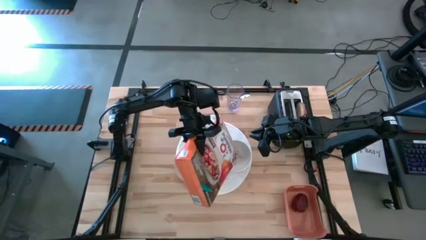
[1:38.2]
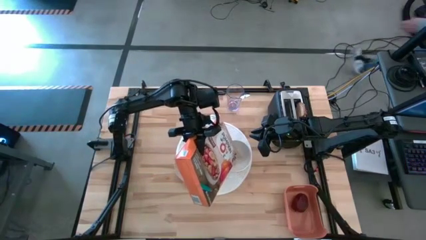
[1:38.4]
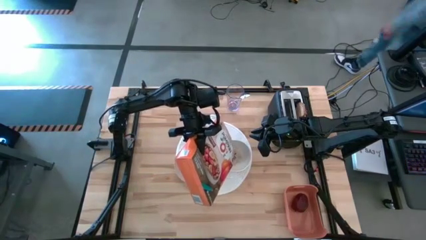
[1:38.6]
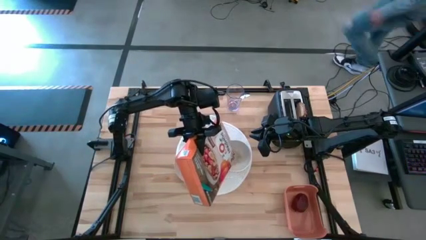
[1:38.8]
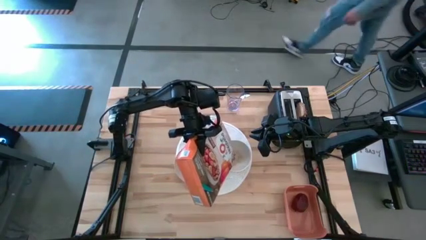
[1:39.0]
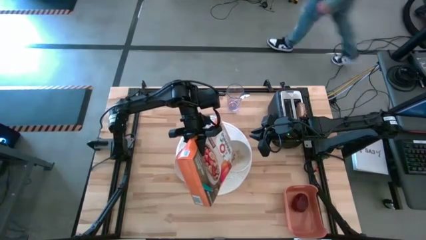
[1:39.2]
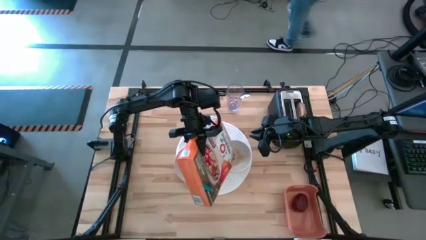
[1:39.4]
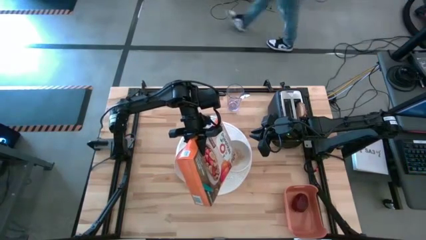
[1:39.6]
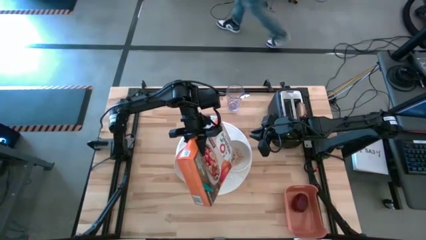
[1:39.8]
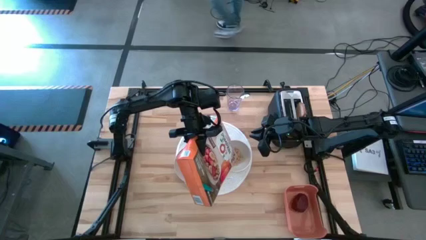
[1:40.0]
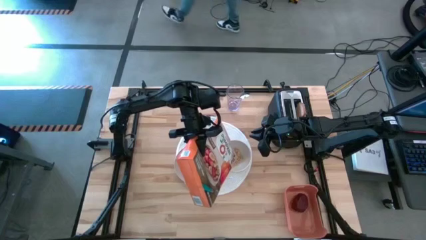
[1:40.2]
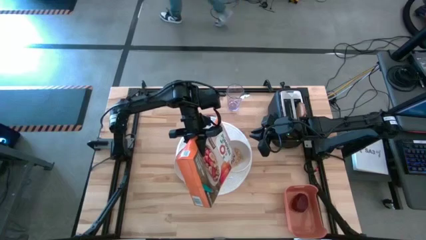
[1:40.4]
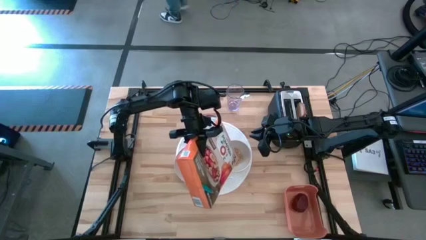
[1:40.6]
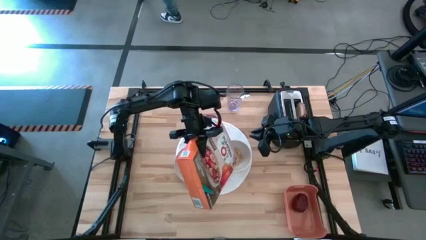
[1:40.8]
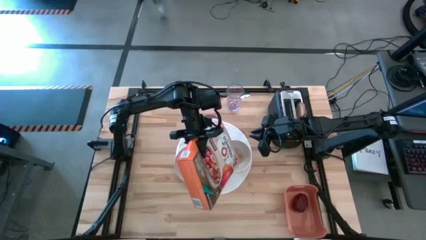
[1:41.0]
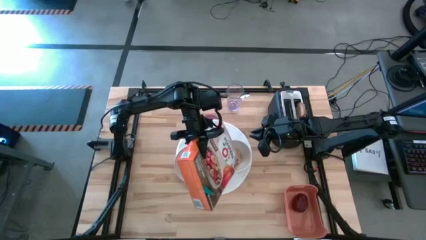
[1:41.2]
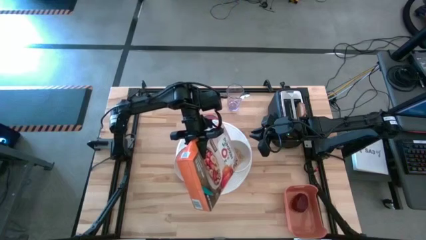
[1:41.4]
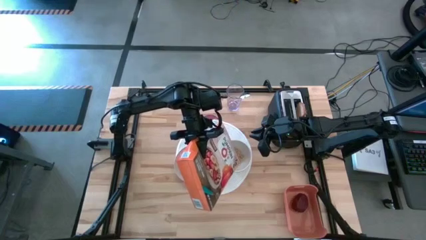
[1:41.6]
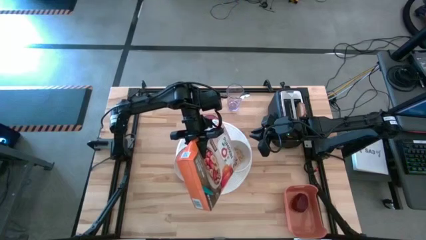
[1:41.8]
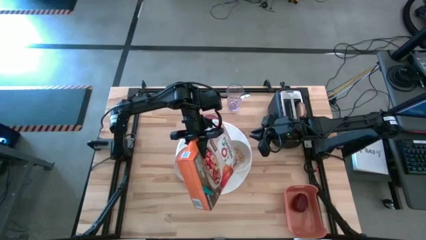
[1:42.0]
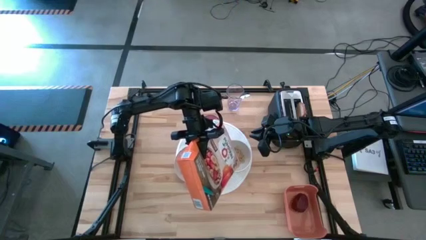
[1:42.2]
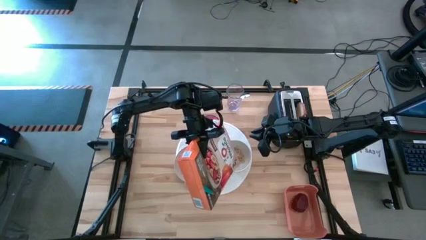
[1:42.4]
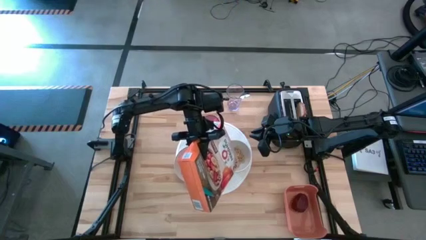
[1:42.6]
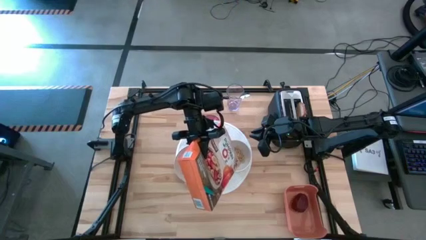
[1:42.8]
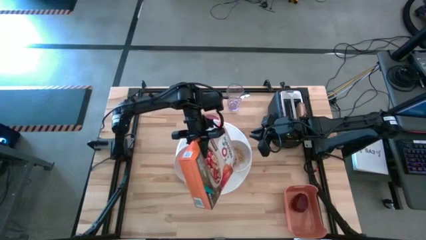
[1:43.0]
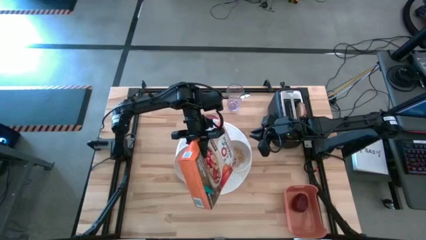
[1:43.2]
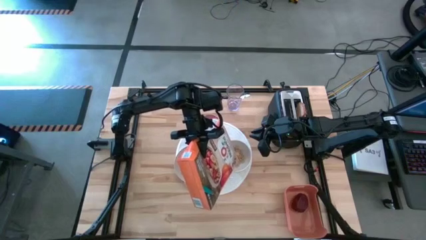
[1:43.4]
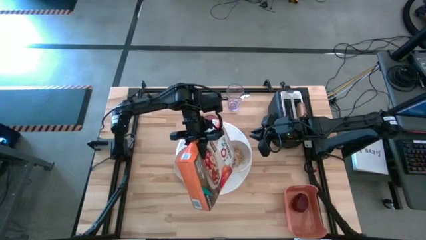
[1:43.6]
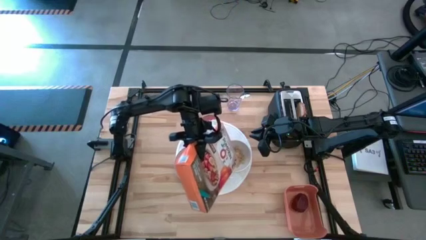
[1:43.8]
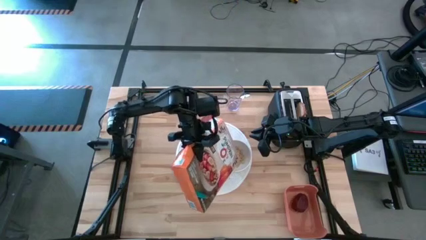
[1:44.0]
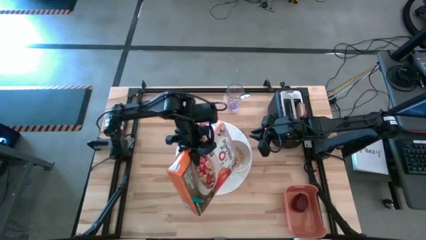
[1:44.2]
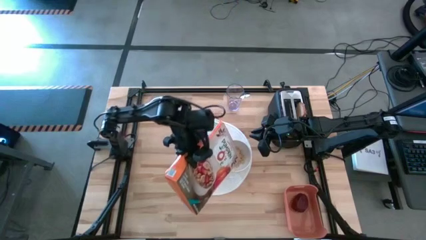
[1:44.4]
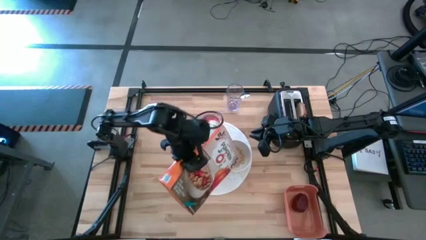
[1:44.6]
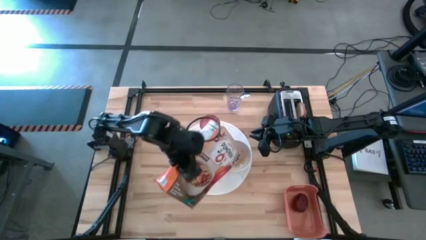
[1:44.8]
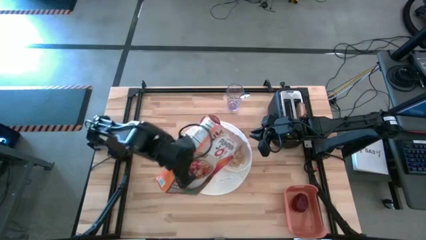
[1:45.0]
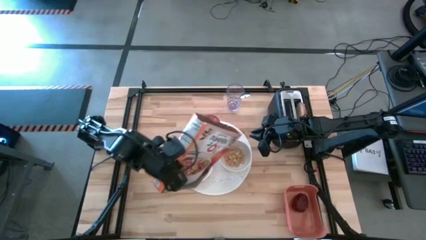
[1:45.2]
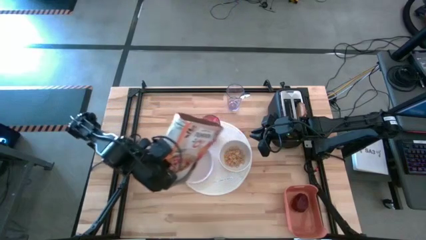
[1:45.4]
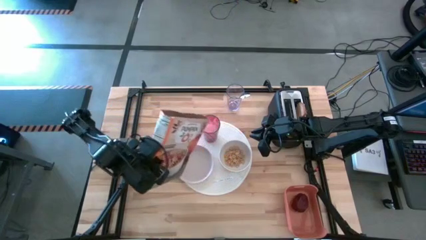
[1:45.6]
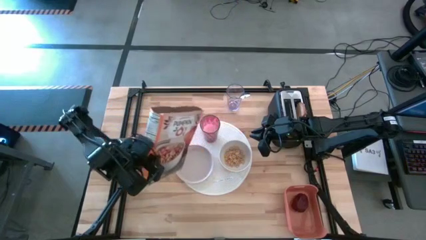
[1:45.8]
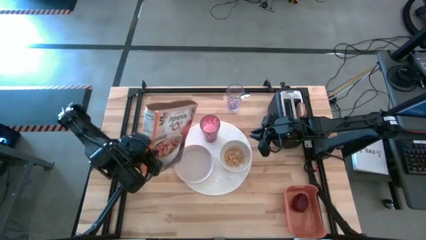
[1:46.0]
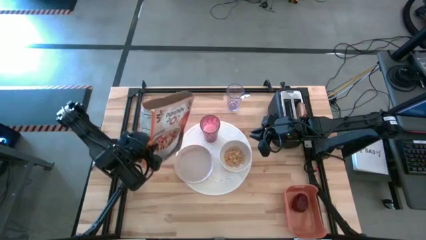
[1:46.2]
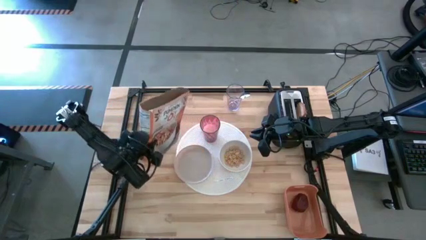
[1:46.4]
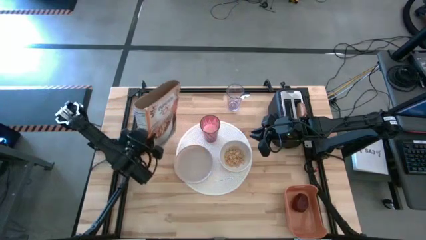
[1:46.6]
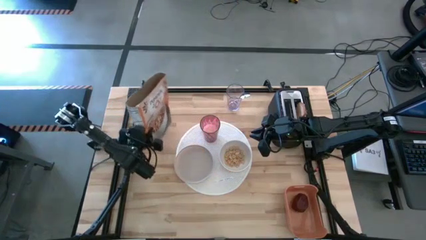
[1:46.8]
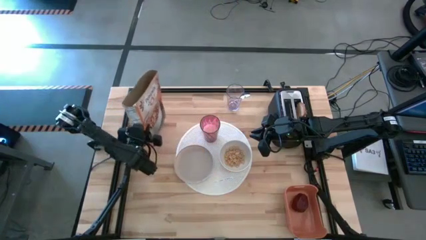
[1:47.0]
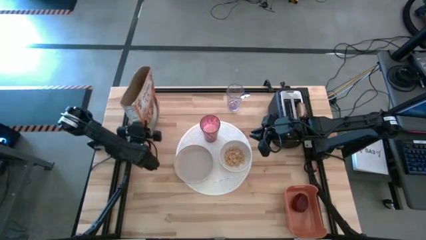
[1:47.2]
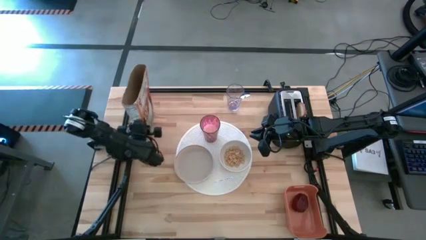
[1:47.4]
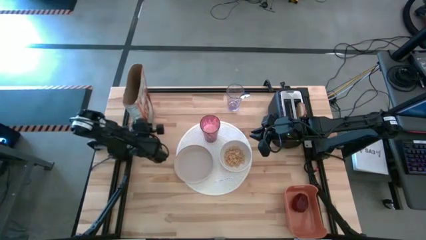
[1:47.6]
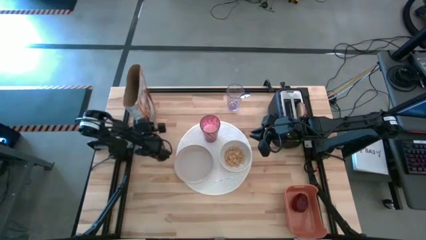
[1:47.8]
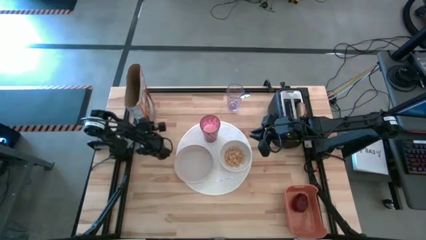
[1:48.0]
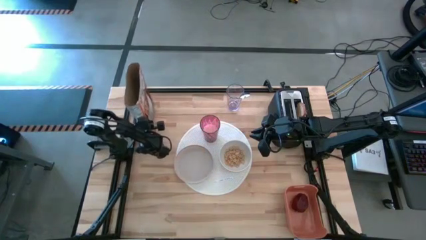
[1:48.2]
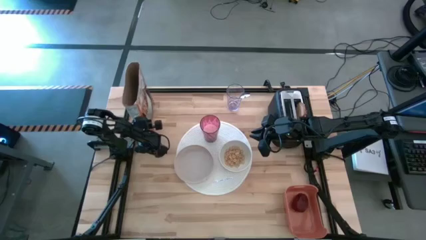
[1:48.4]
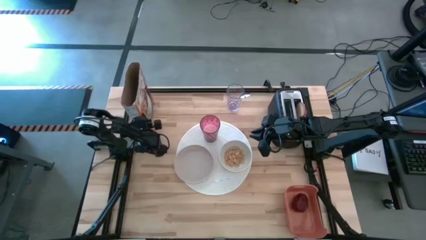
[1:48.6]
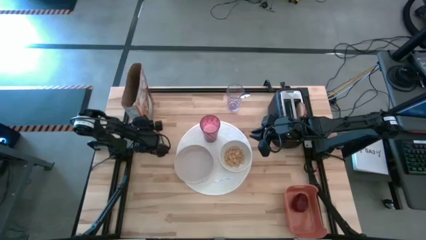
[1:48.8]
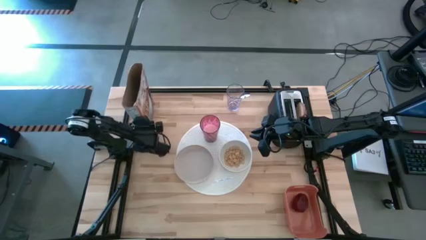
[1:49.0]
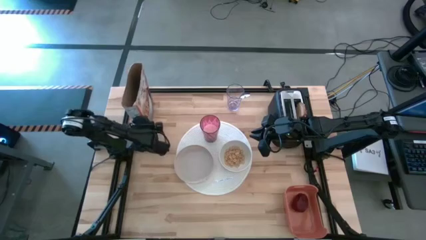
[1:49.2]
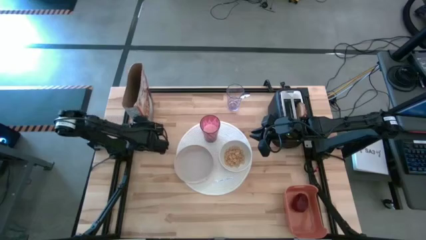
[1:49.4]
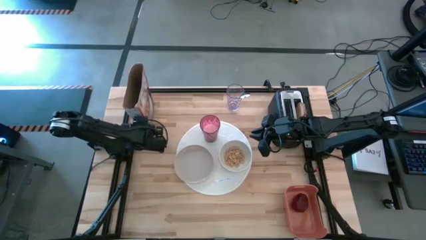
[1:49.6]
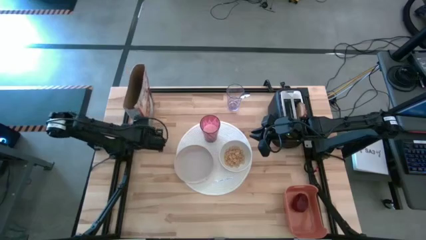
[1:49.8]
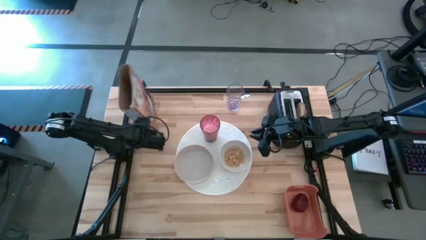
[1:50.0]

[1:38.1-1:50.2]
Task: Arrange a breakfast setting
Pour the cereal from the cereal box into the white bowl

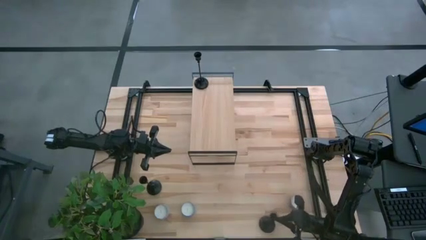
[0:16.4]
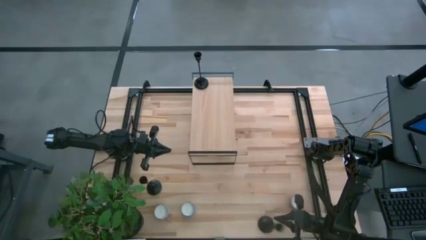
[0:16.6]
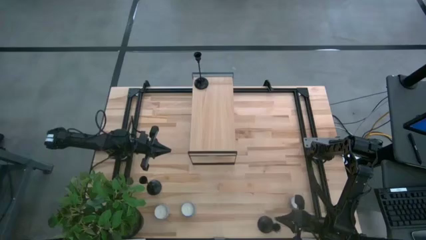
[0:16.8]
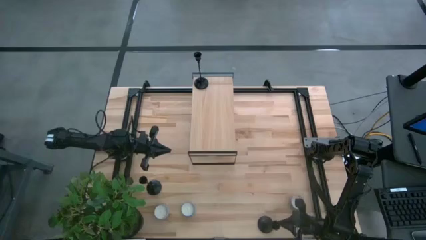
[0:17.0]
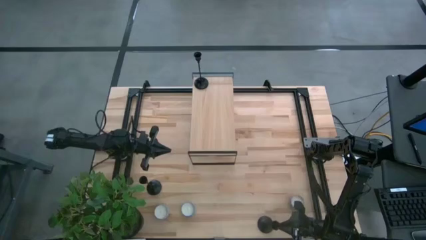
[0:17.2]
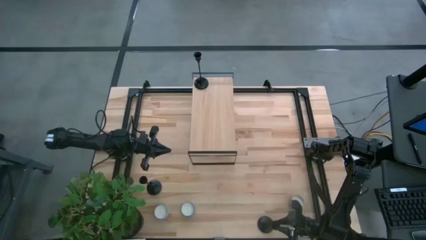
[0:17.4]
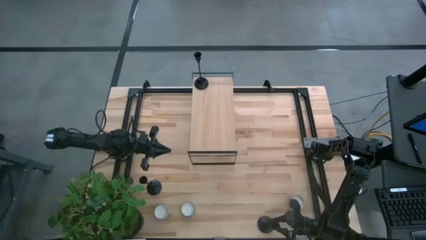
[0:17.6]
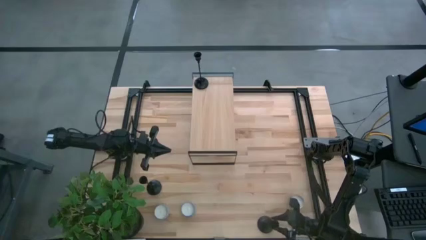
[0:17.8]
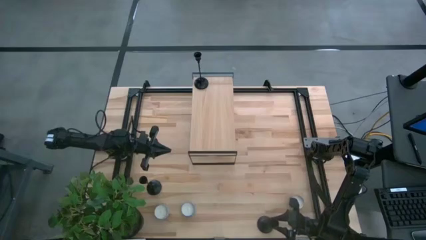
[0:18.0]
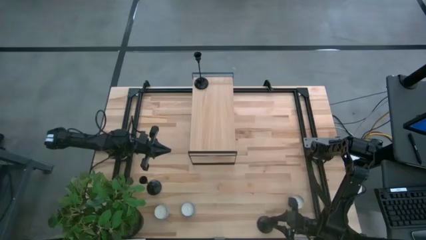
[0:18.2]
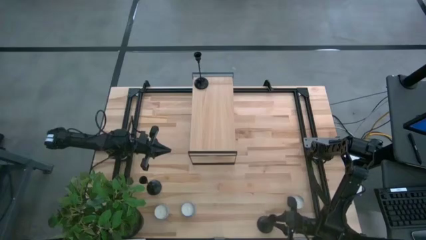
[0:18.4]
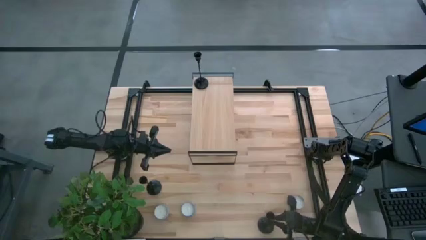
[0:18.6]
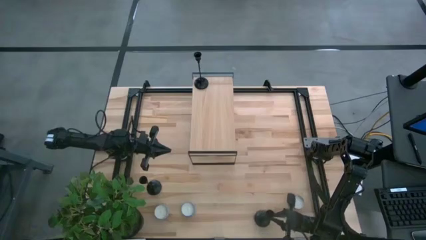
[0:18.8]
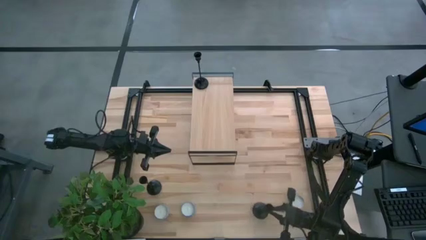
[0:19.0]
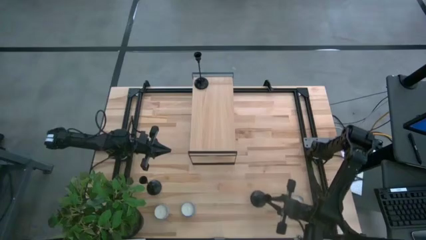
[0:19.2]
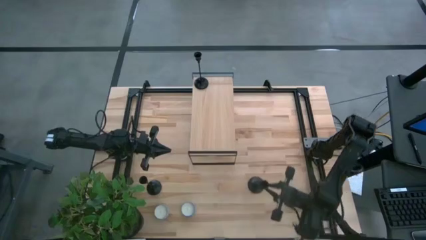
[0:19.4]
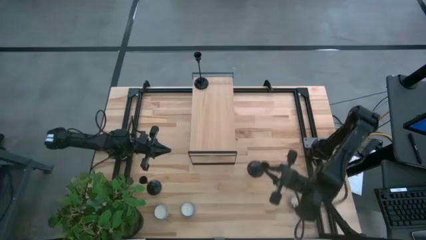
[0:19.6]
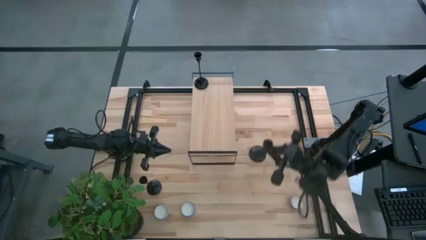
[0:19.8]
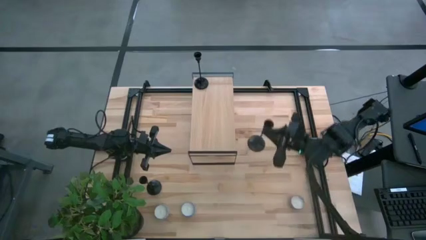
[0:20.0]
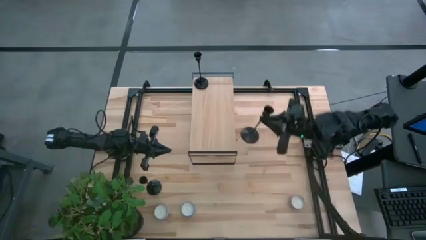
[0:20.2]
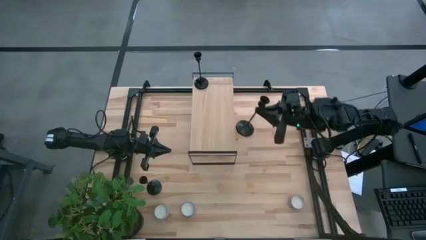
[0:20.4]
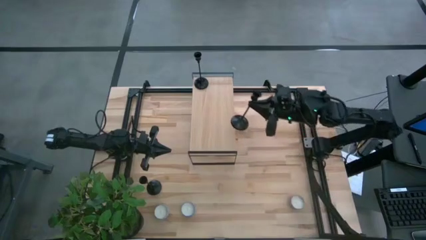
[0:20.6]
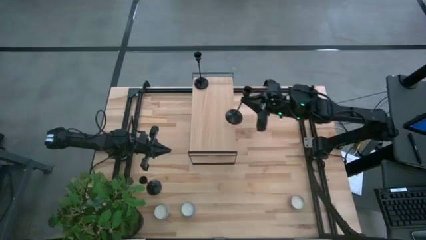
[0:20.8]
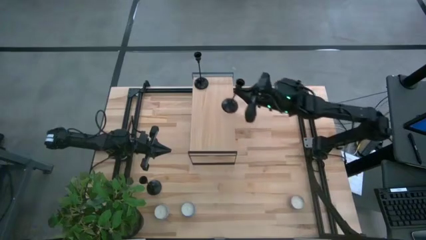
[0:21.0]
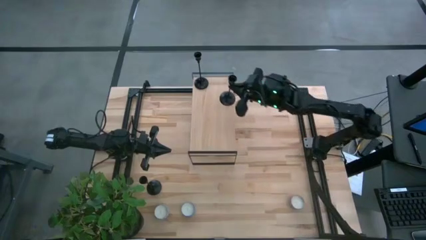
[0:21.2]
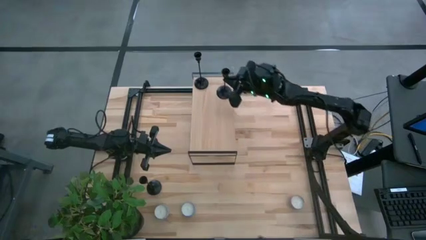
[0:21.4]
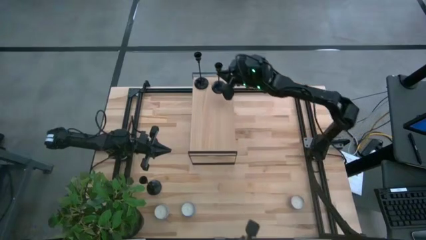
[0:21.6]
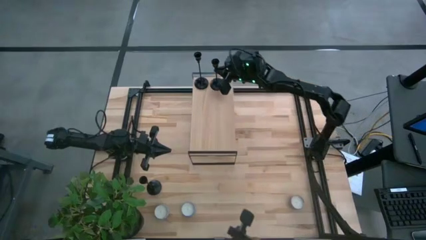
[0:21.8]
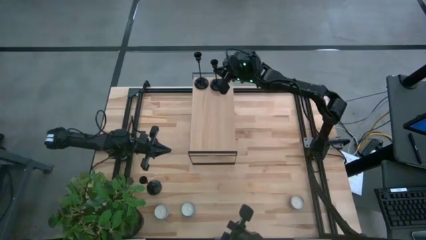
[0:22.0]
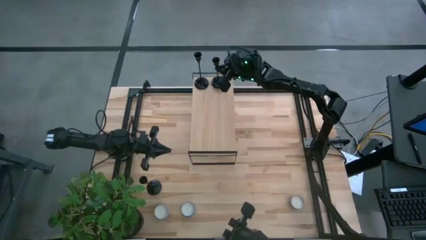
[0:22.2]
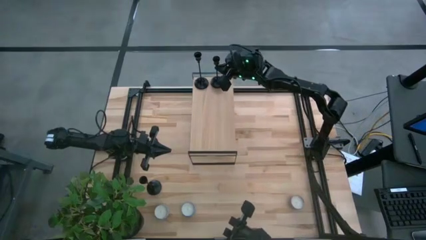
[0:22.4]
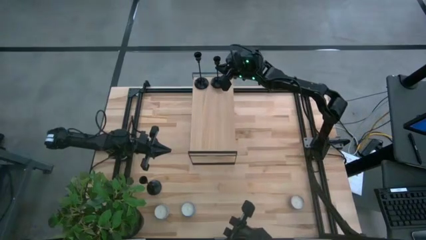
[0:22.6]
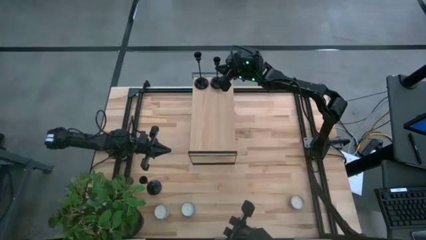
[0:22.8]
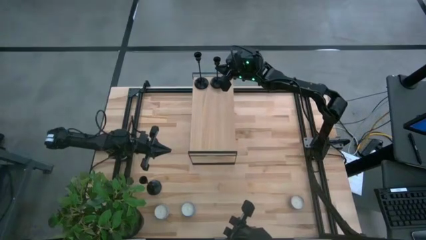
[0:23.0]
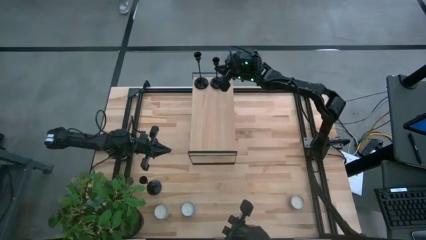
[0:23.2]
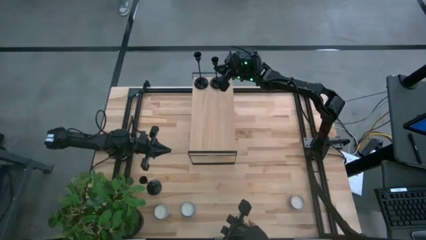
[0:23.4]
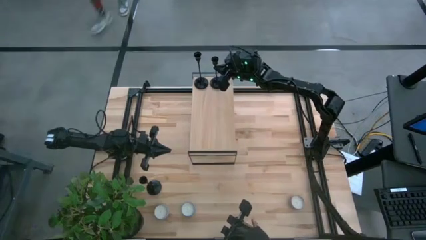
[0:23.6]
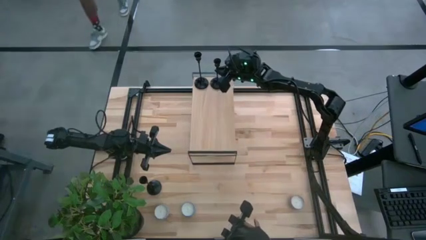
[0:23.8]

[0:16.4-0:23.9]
Task: Pick & Place candle stick holders
Align the right black candle holder with the other black candle holder on the shelf
